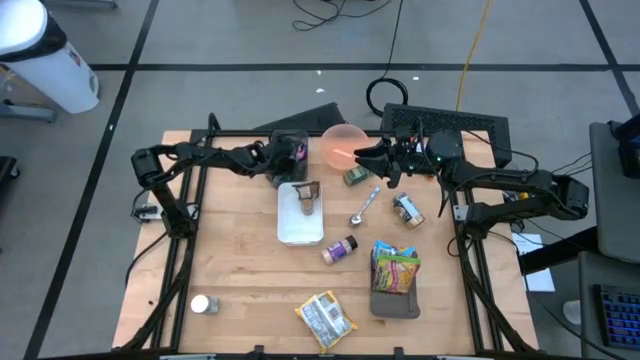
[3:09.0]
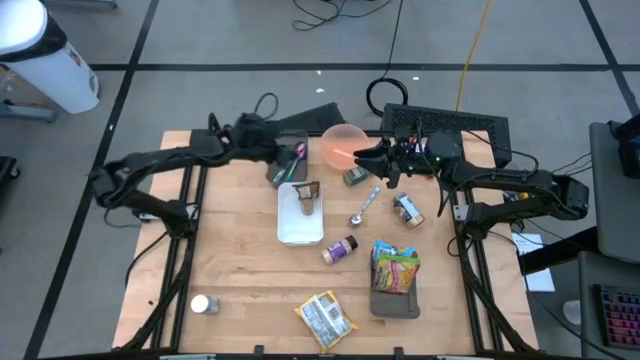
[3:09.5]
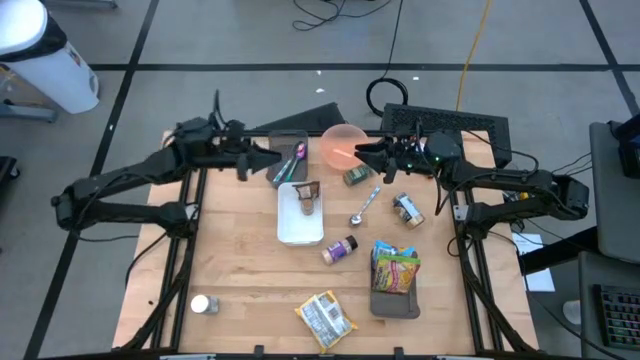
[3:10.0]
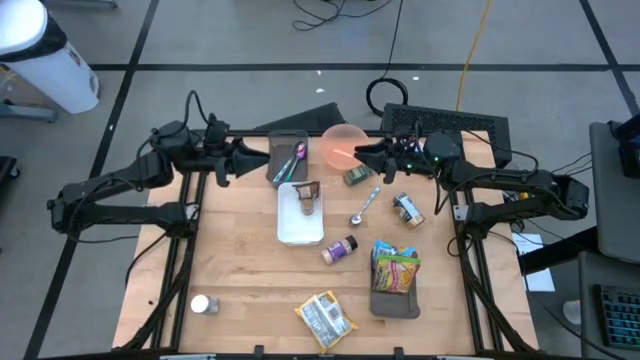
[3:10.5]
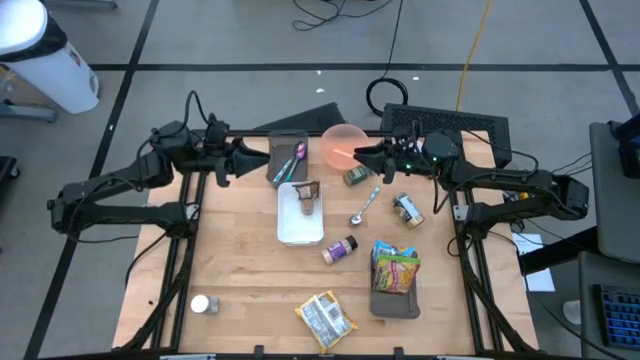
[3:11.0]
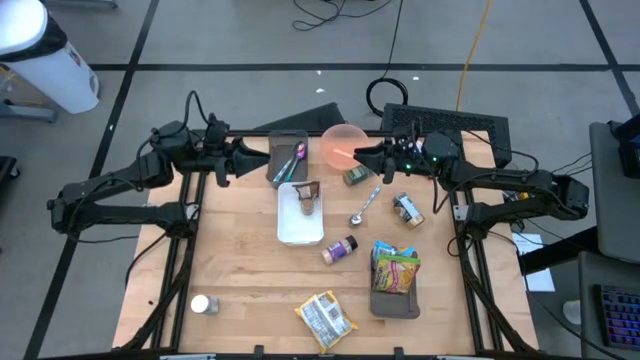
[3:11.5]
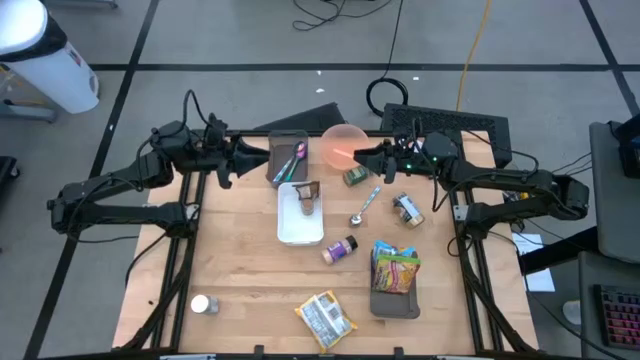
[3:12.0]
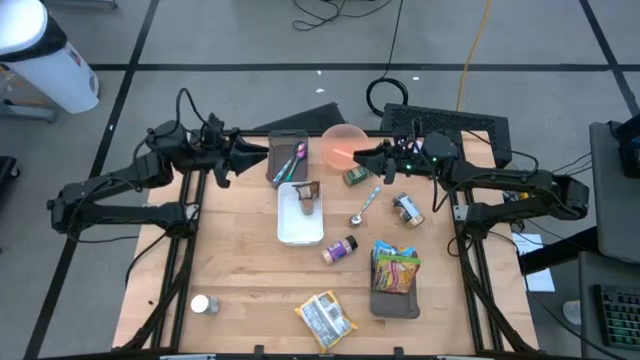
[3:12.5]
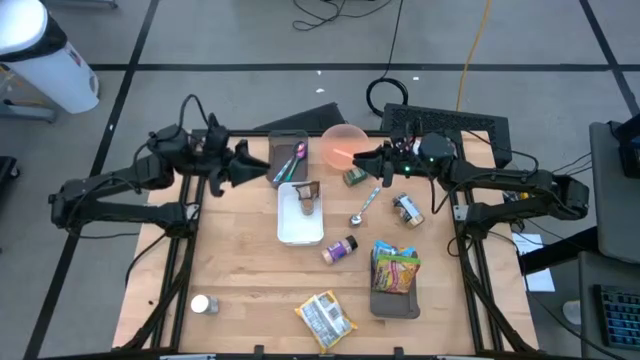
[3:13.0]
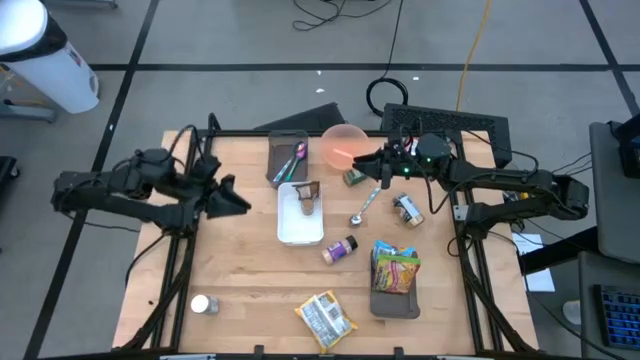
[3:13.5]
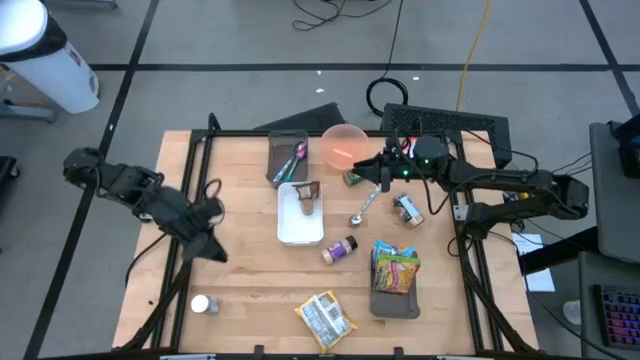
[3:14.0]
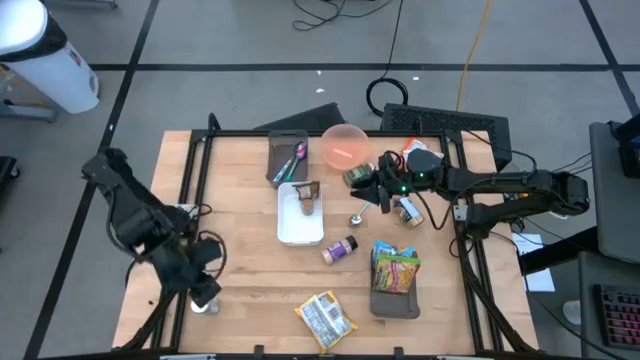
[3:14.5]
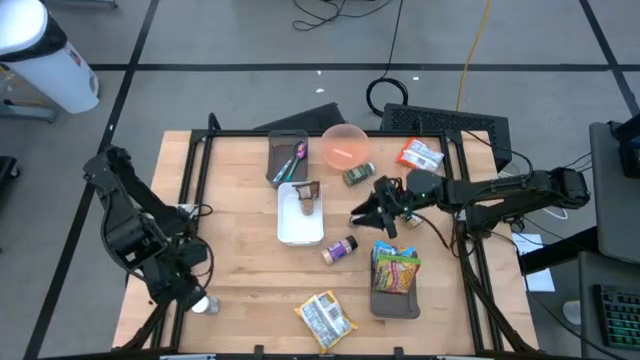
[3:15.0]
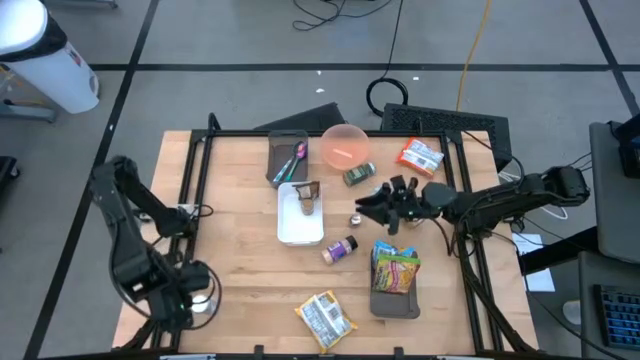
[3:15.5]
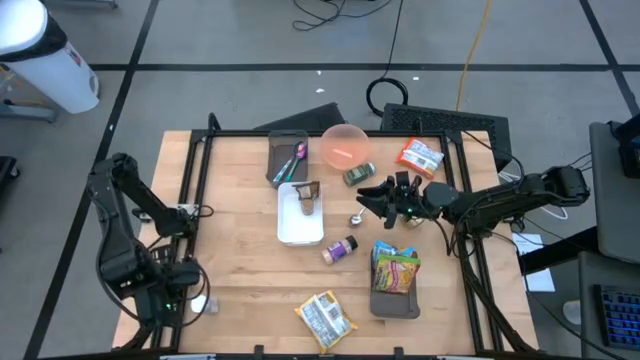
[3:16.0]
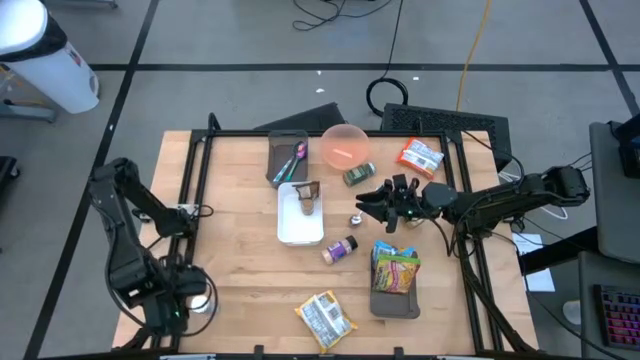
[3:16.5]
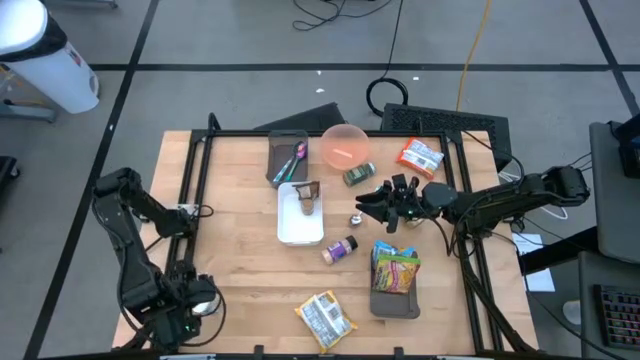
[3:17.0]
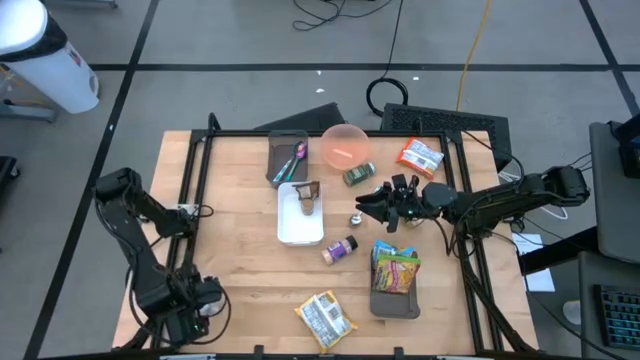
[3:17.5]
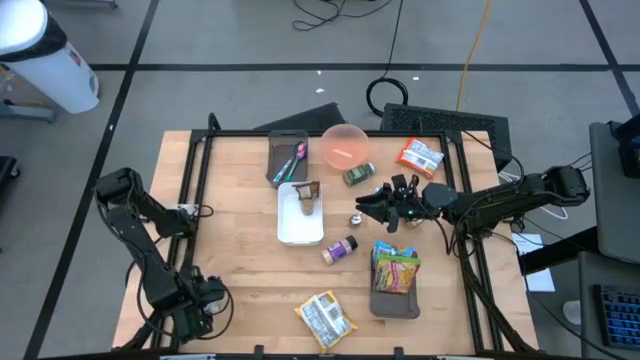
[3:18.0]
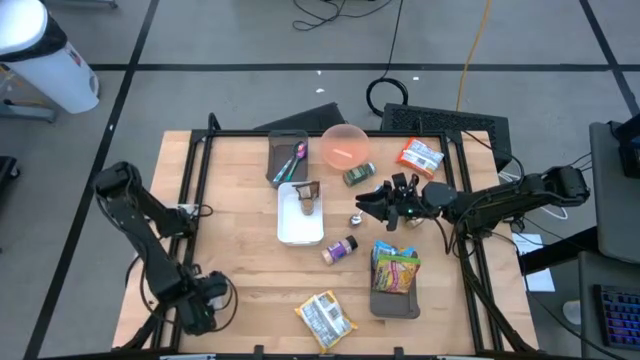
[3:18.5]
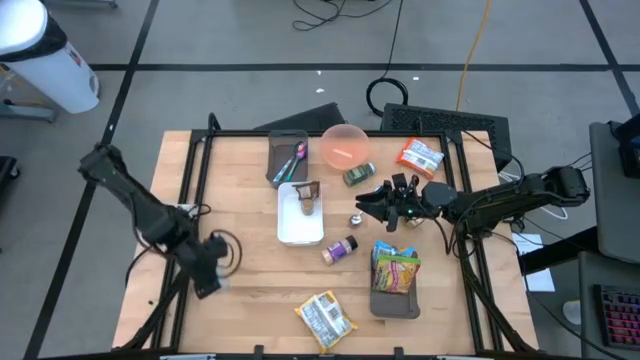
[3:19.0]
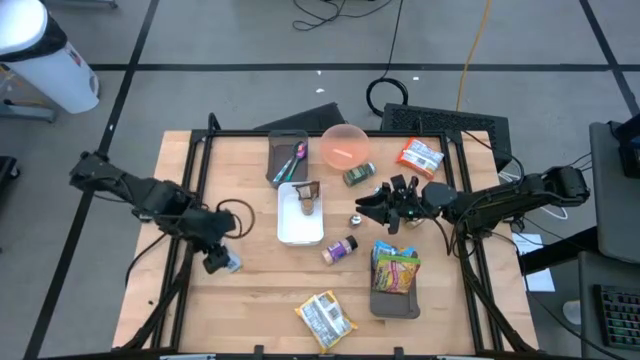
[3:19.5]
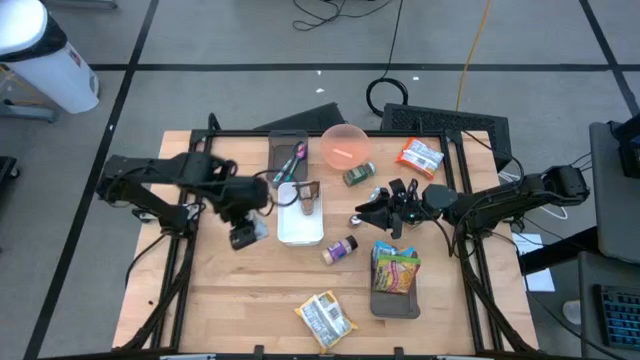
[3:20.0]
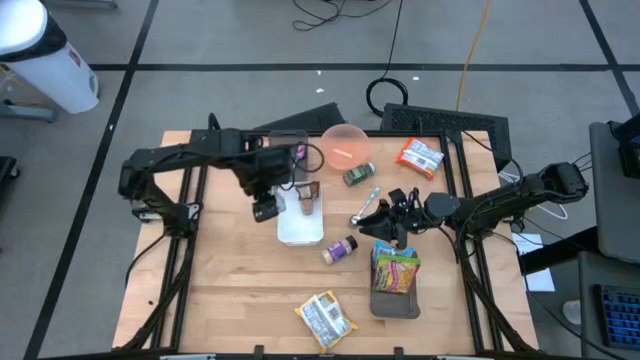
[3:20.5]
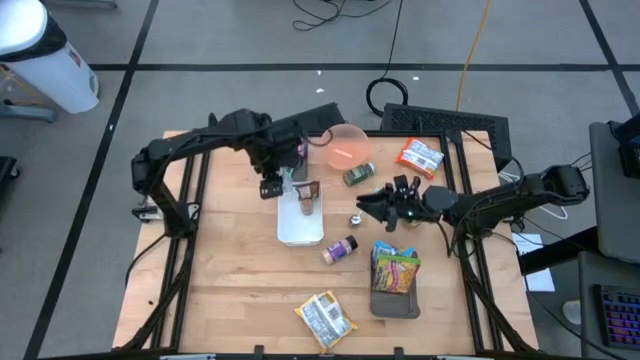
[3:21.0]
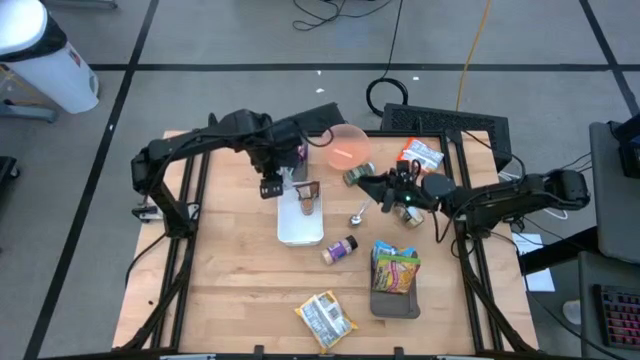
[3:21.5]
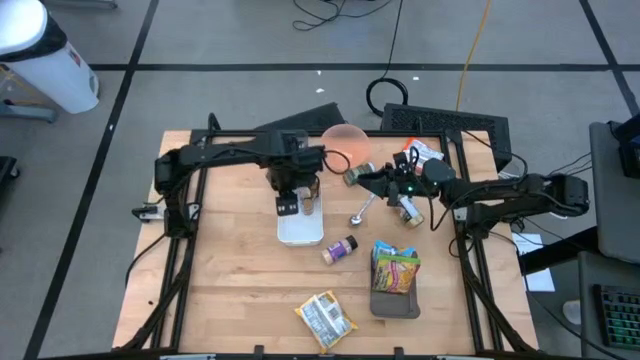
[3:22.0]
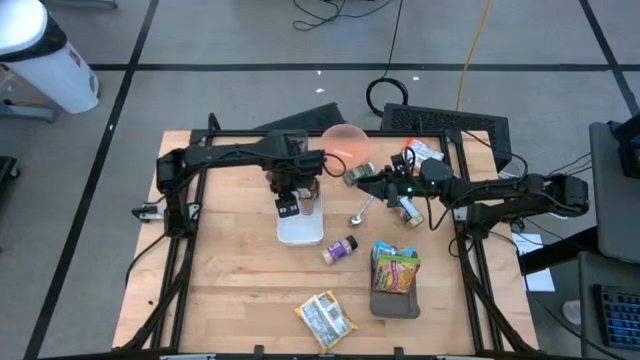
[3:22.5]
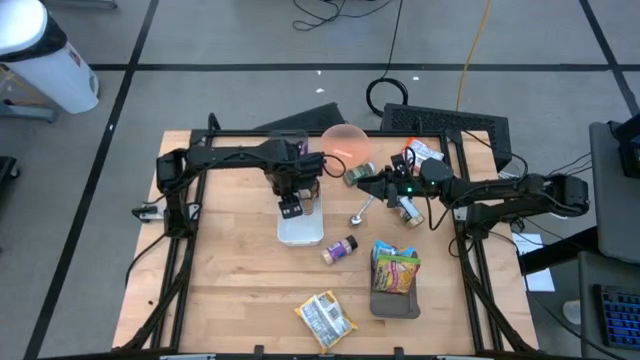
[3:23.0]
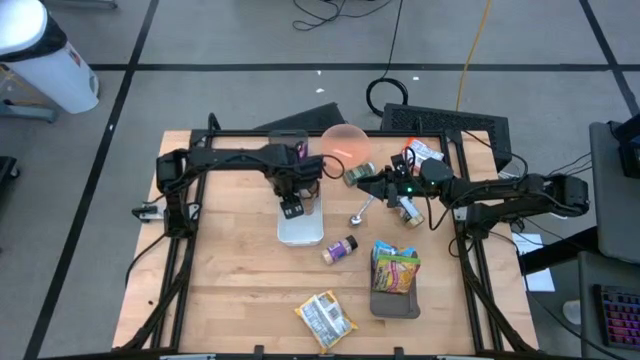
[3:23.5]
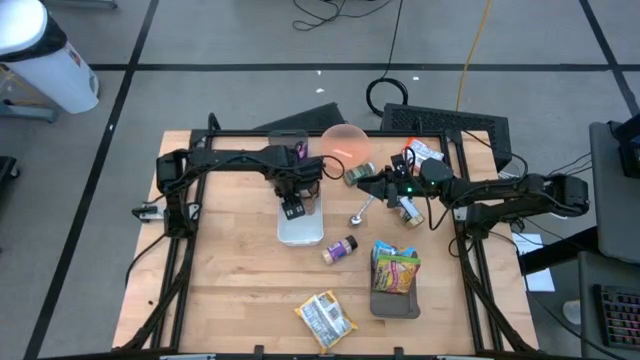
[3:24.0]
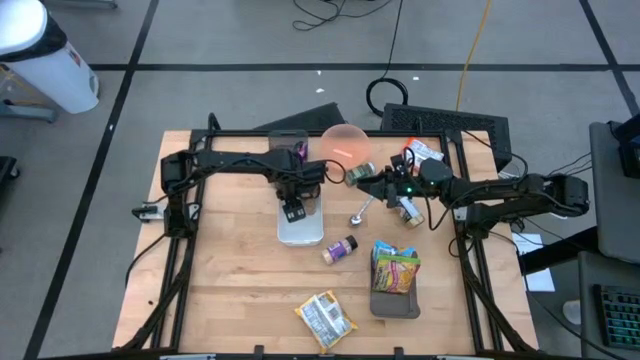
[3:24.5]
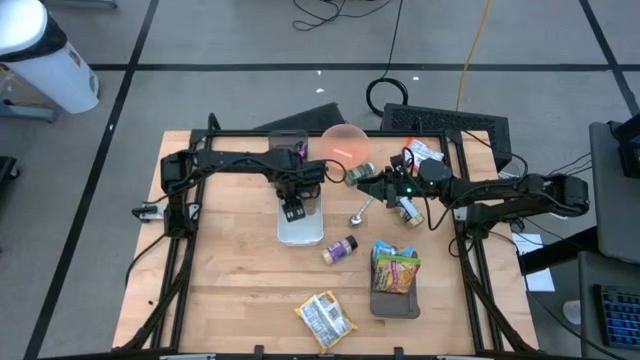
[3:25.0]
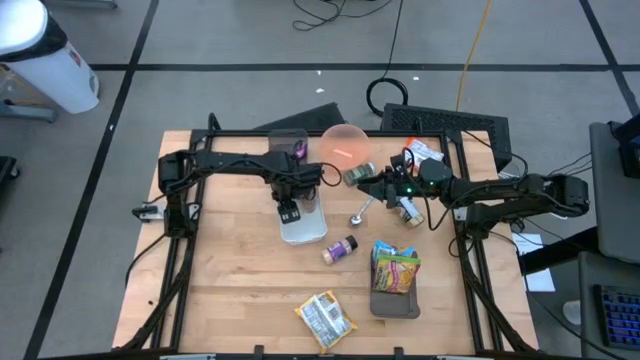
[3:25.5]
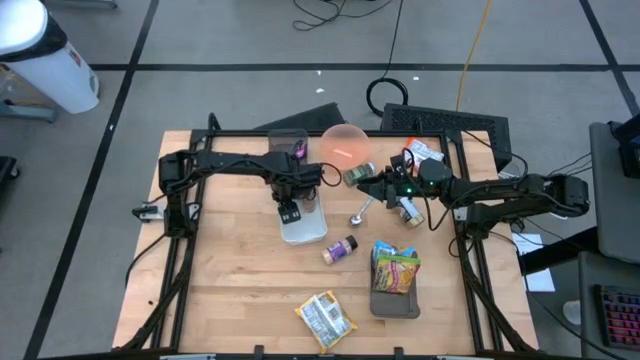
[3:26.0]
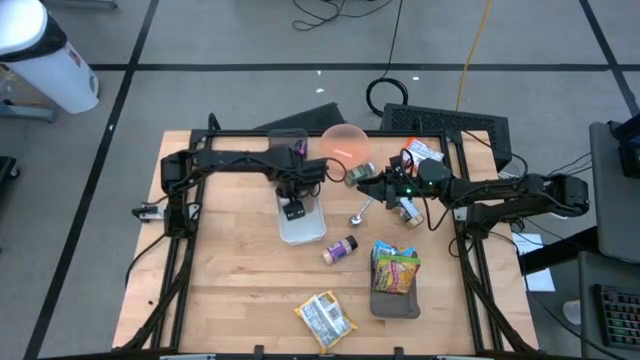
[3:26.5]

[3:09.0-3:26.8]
Task: Pick & Place Food Item
Put the white seasoning bottle into the white bin

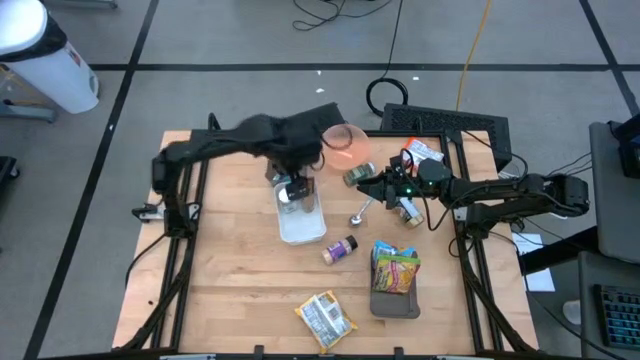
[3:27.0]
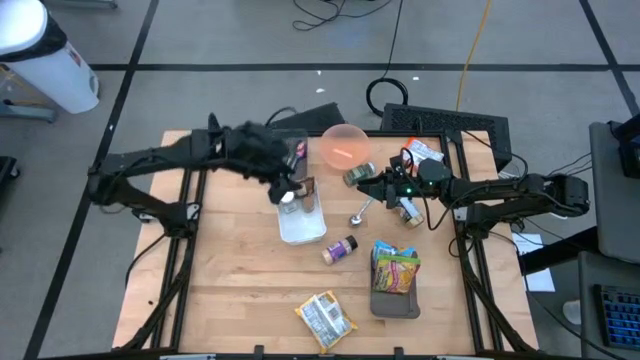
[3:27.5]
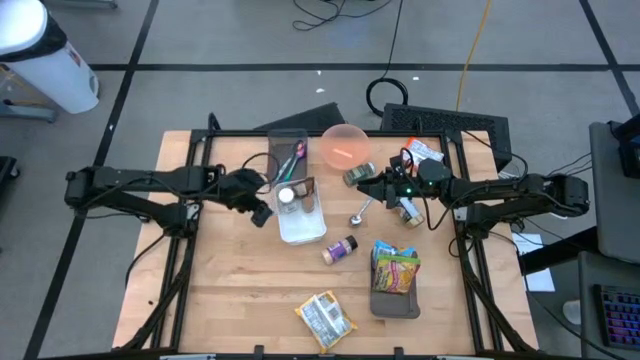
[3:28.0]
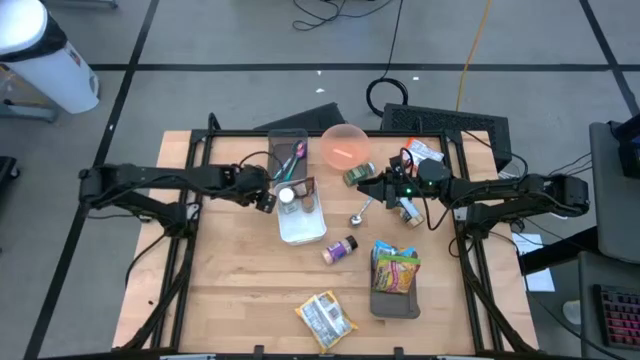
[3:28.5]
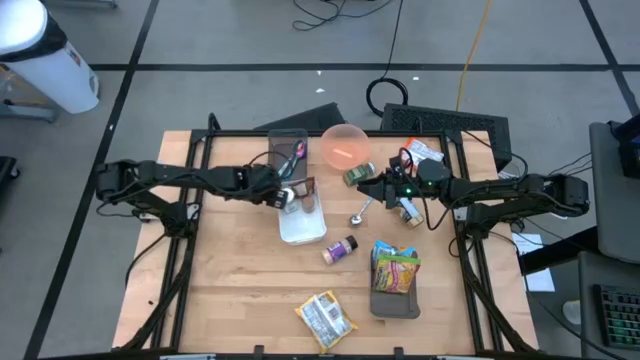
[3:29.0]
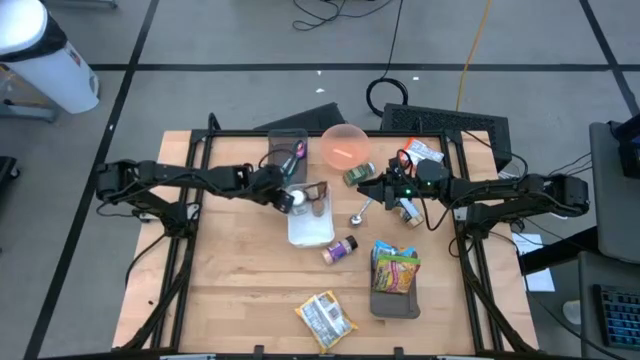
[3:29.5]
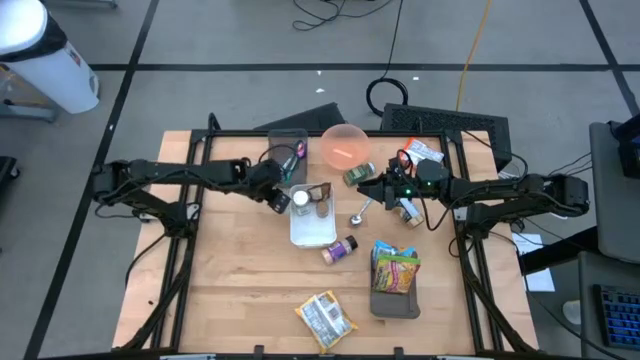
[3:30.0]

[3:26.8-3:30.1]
Adjust the white bin
